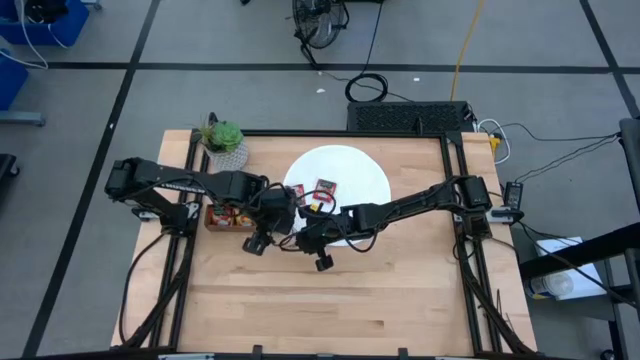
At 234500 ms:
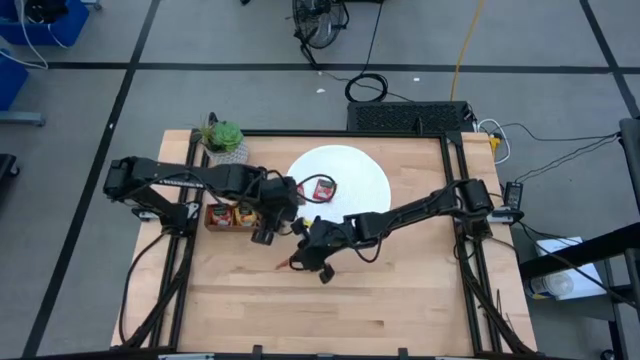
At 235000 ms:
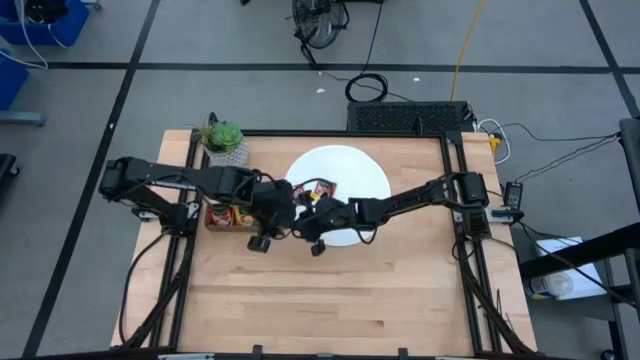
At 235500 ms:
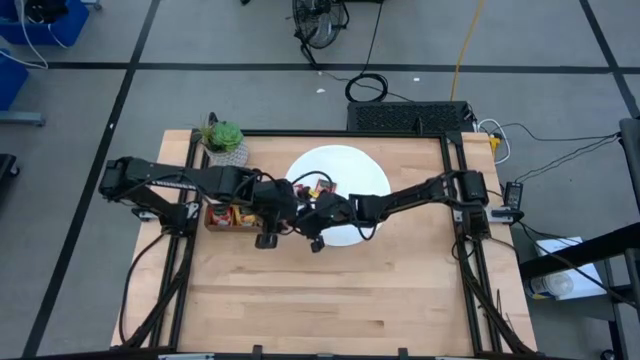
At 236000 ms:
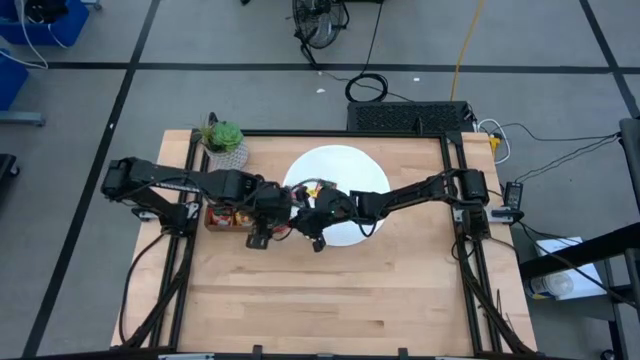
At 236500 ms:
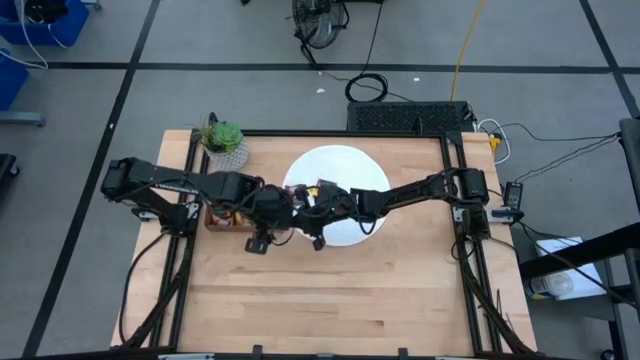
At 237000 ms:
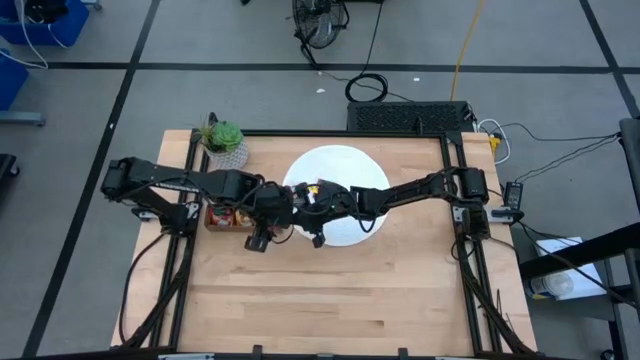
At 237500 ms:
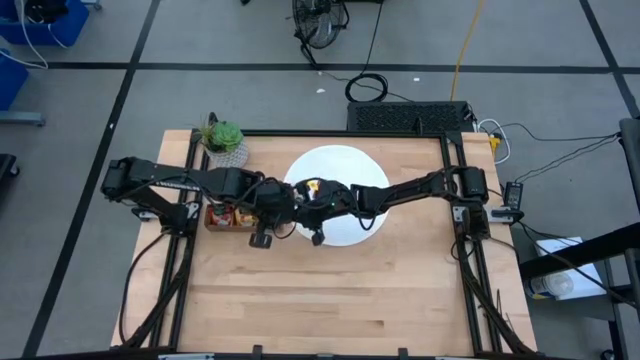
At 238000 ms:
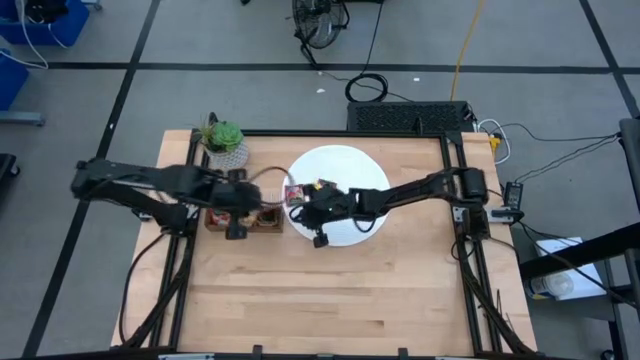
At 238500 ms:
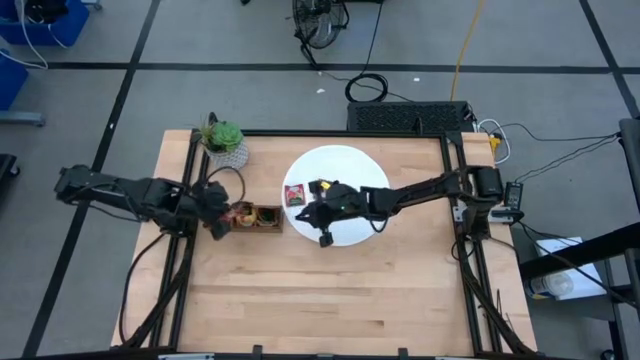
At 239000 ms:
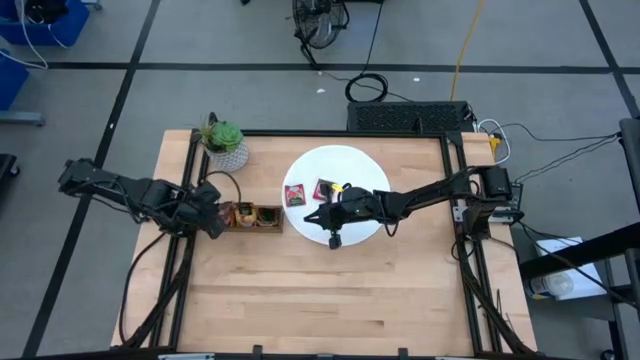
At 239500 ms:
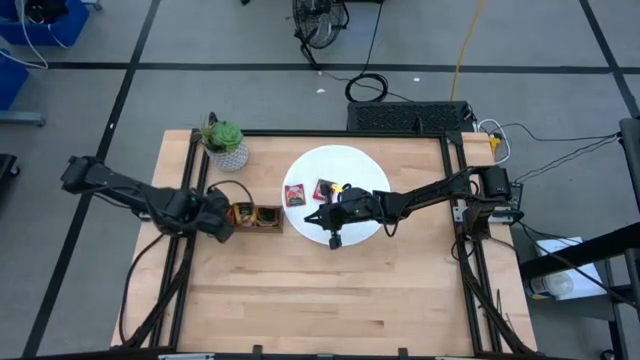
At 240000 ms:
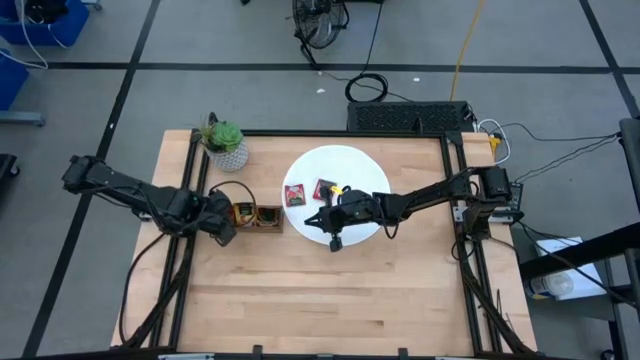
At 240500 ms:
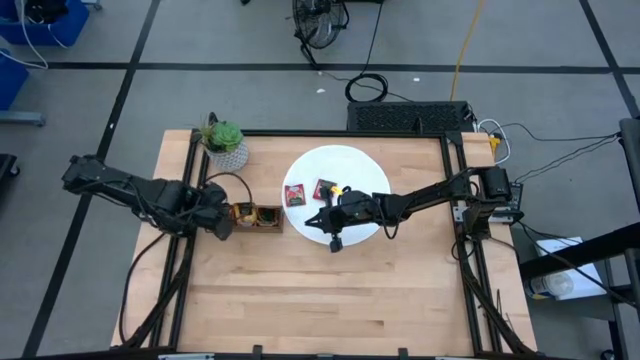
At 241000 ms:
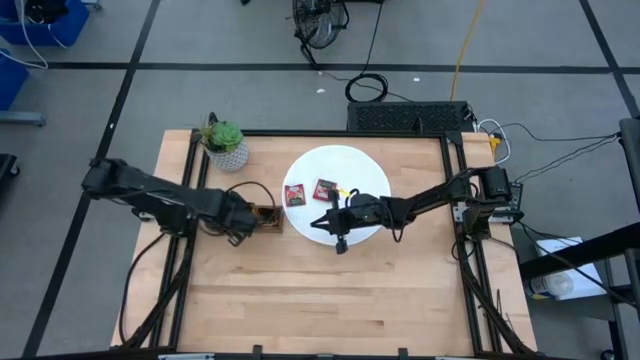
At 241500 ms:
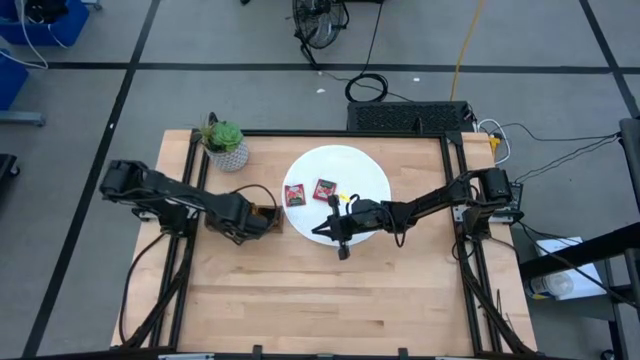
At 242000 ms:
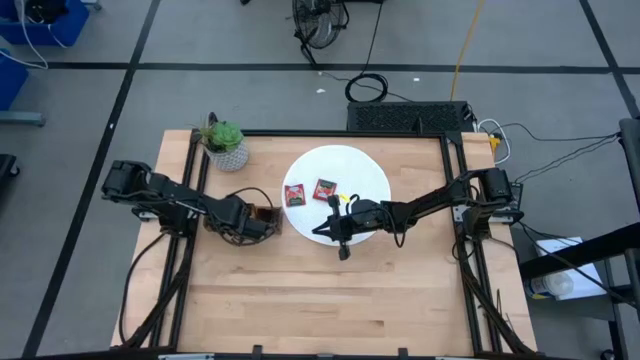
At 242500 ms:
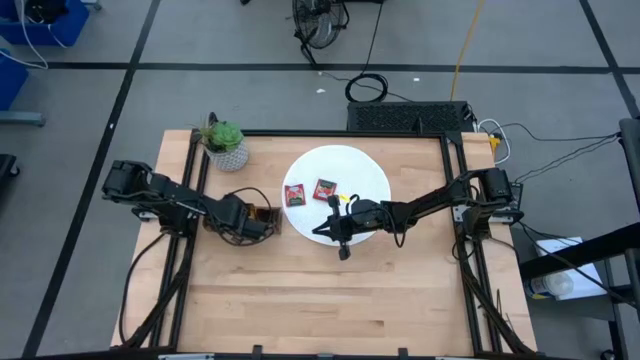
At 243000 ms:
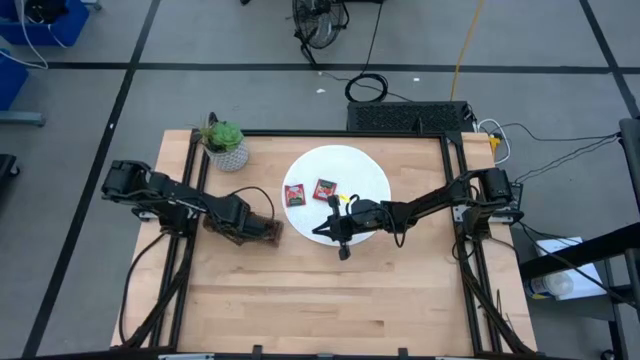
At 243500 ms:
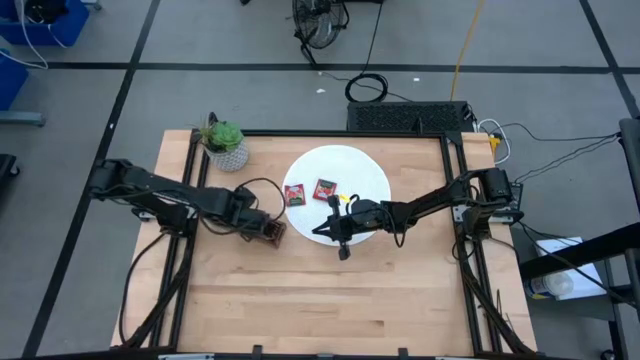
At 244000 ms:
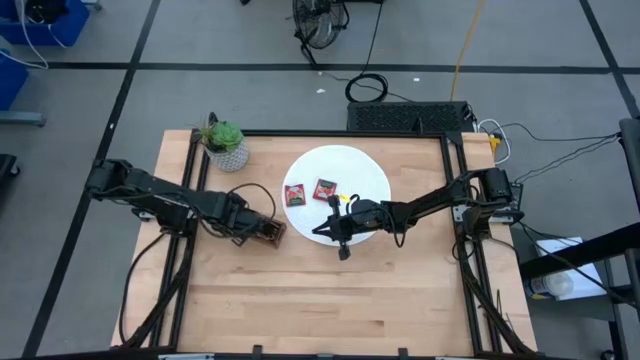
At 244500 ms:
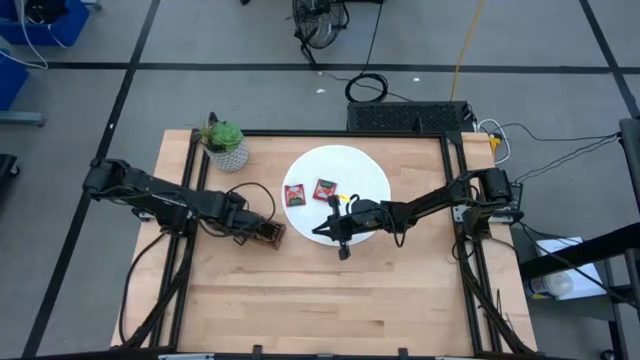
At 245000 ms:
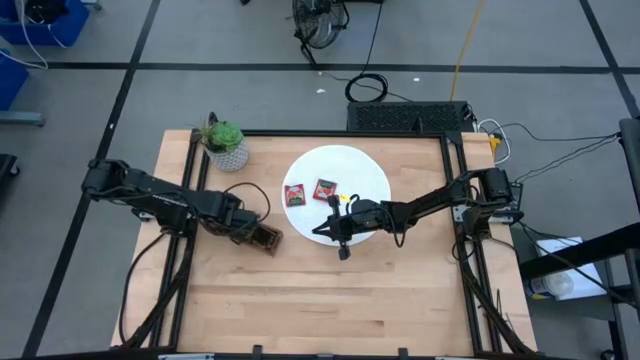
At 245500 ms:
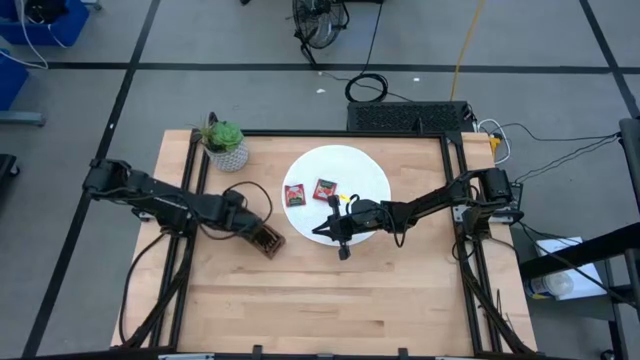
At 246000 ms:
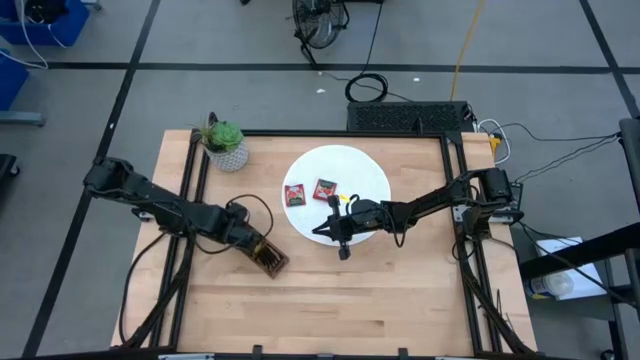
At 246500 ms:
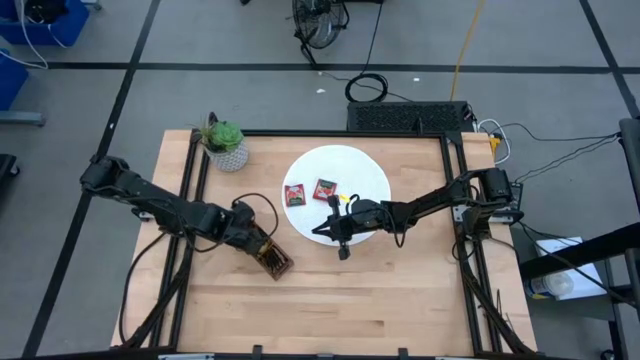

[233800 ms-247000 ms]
Task: Pick & Place Tea
Put the red tea bag into the left section of the wooden organizer

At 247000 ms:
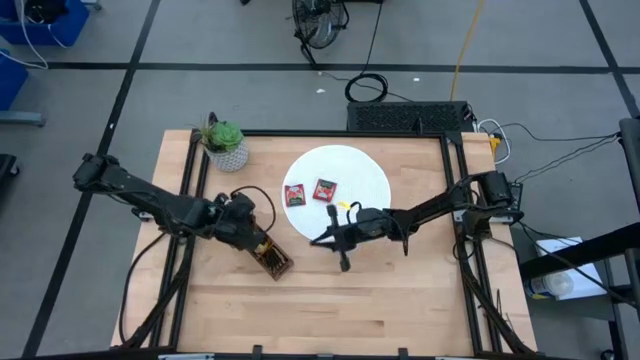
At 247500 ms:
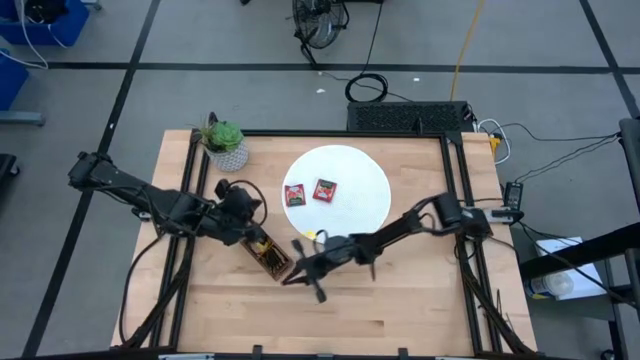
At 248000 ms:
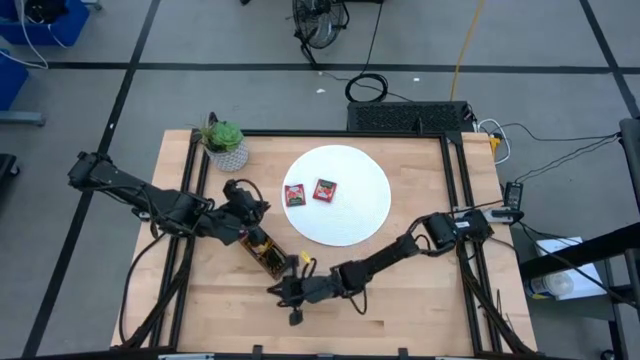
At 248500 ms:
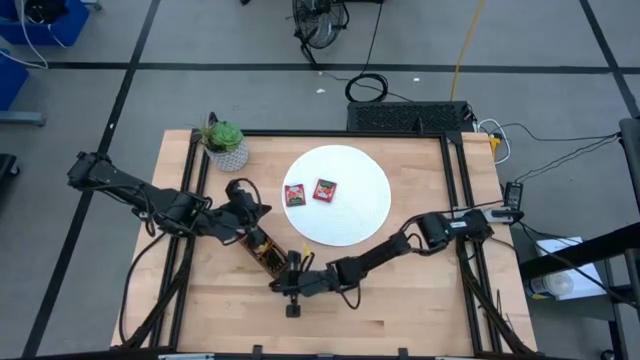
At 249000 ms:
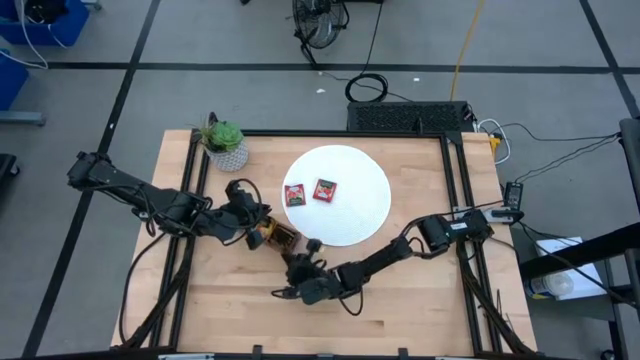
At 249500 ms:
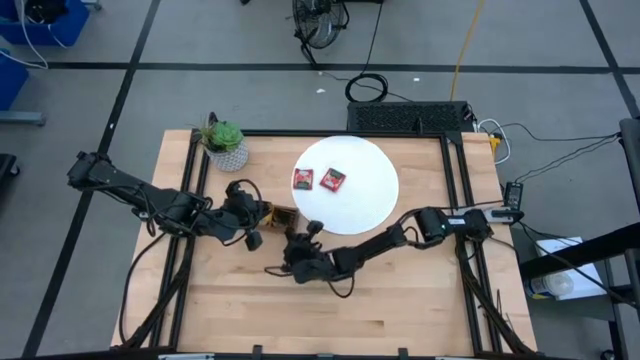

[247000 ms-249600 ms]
Adjust the wooden organizer

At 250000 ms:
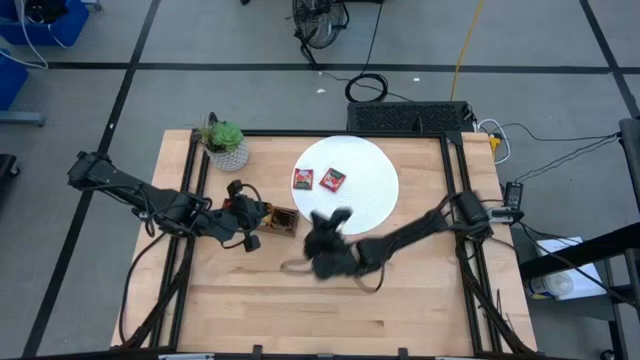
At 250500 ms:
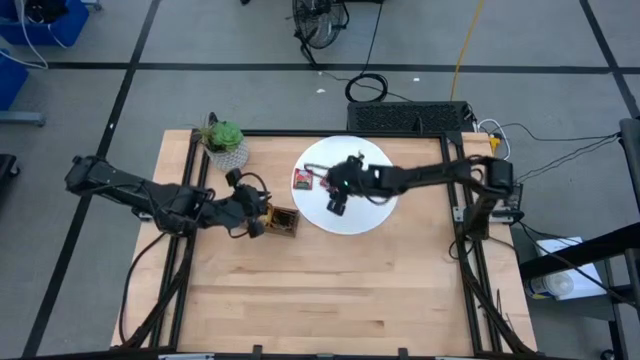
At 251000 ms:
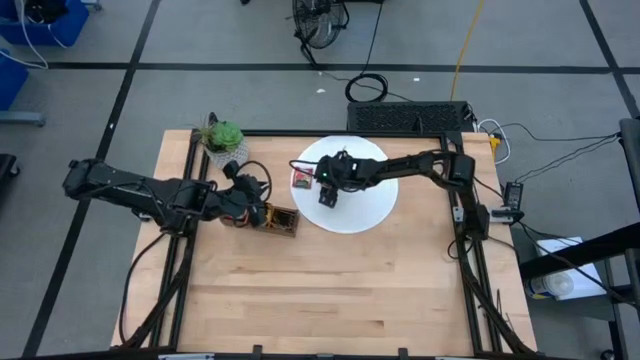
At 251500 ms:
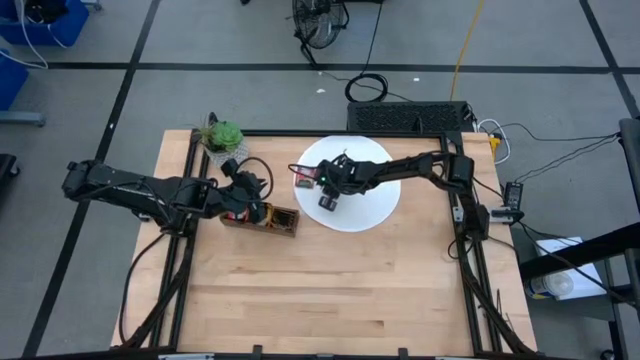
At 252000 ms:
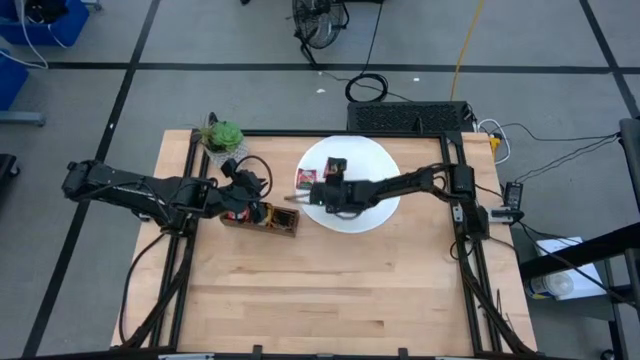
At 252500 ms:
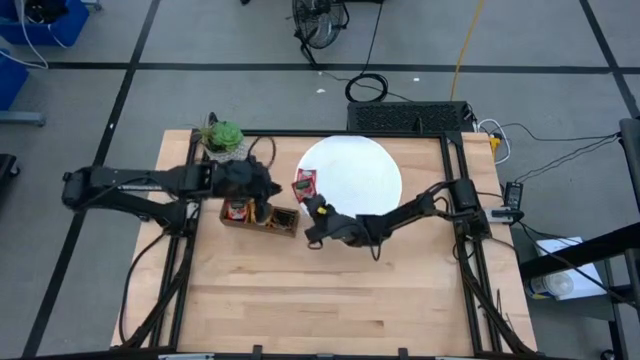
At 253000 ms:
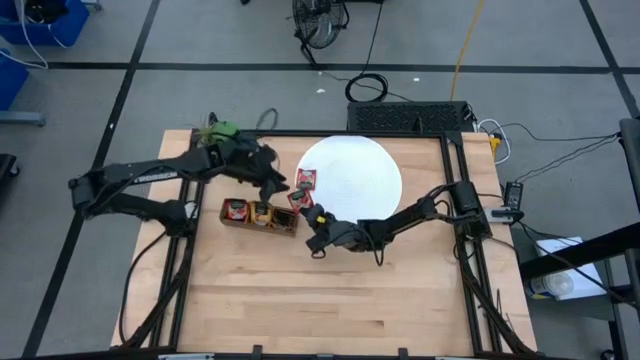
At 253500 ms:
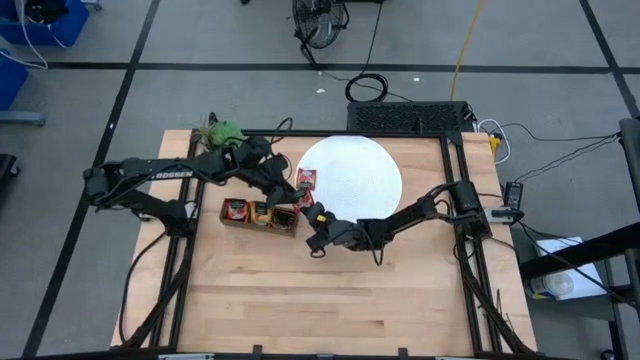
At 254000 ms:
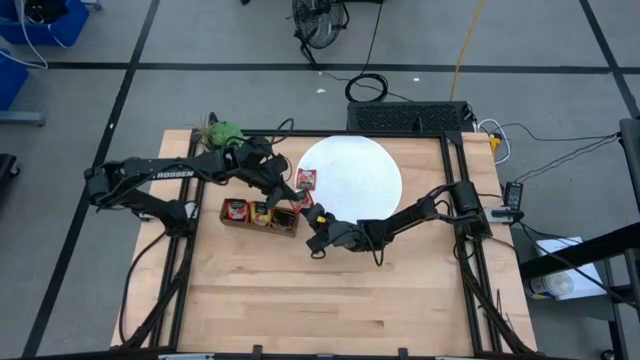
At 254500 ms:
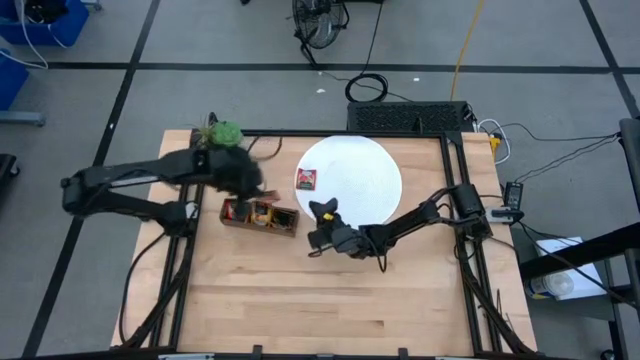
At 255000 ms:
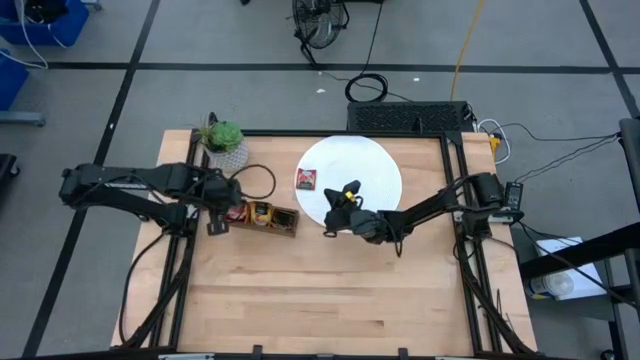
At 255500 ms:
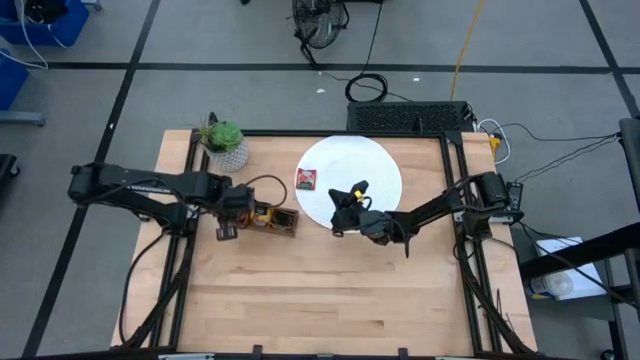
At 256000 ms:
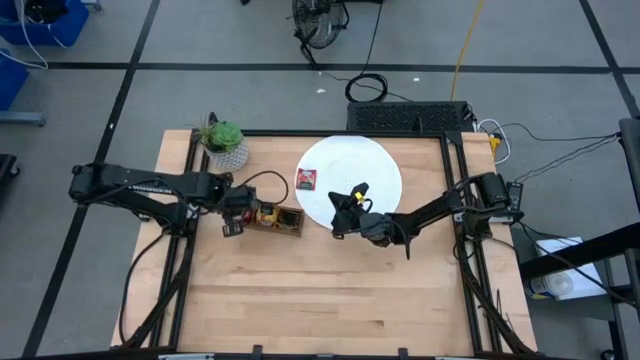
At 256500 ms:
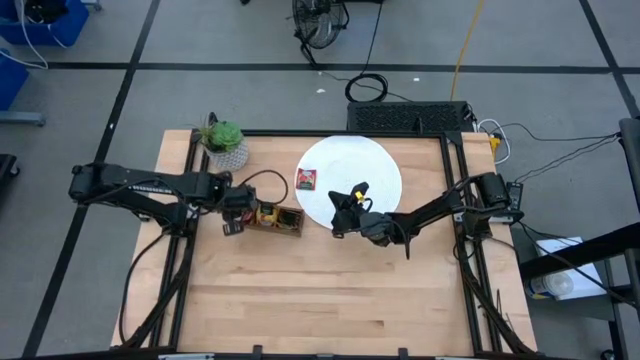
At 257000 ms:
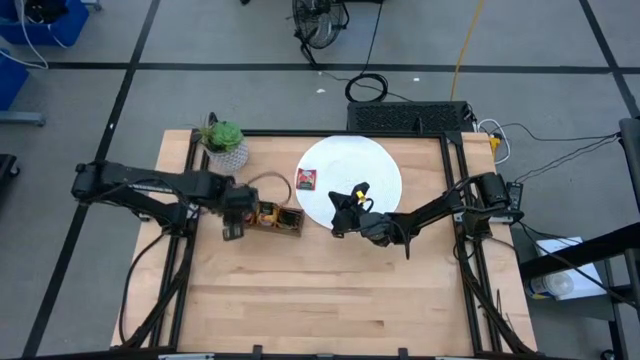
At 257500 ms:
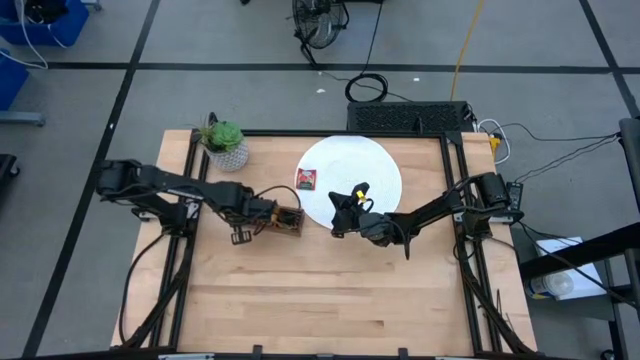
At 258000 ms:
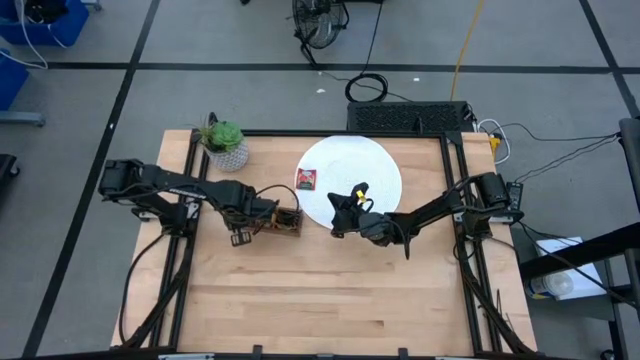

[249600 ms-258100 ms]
Put the red tea bag into the left section of the wooden organizer
